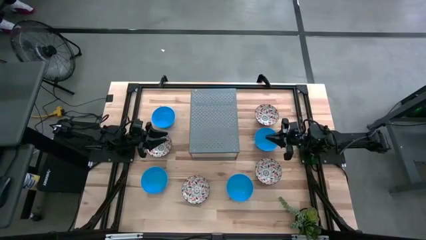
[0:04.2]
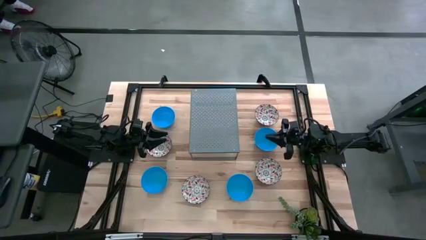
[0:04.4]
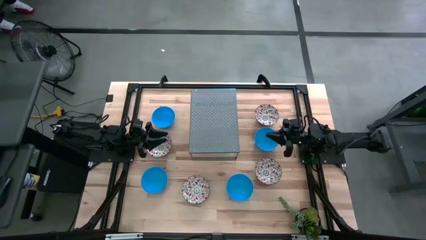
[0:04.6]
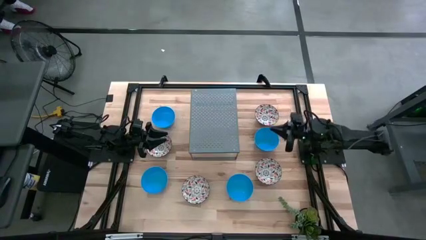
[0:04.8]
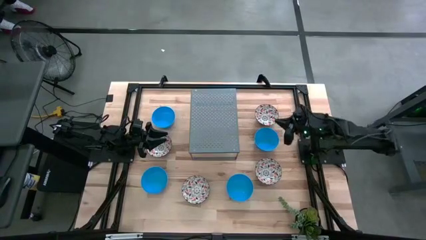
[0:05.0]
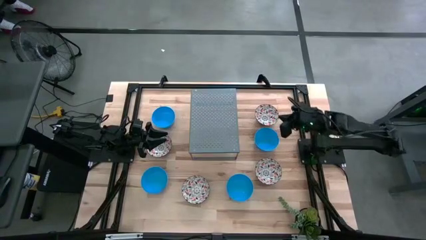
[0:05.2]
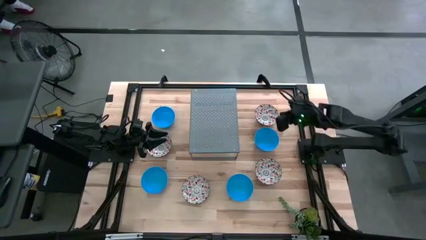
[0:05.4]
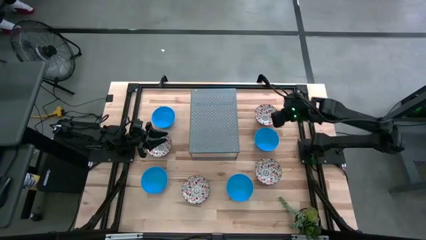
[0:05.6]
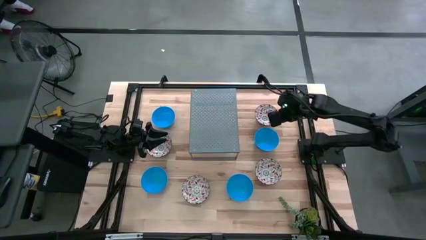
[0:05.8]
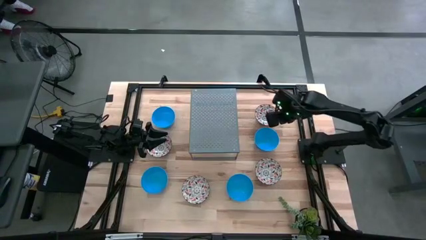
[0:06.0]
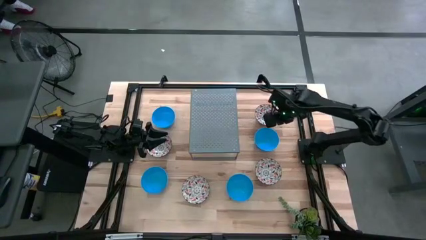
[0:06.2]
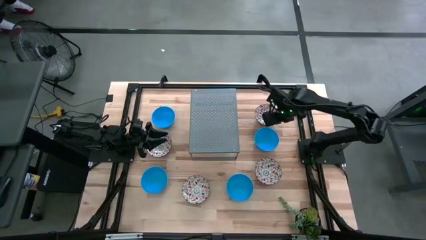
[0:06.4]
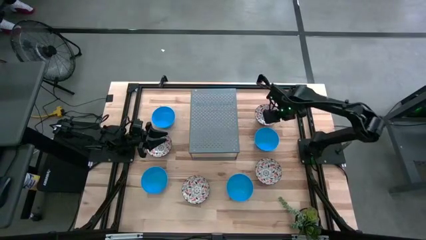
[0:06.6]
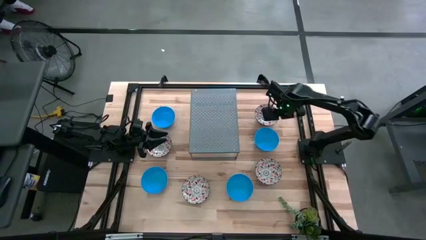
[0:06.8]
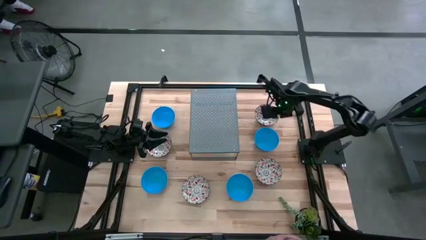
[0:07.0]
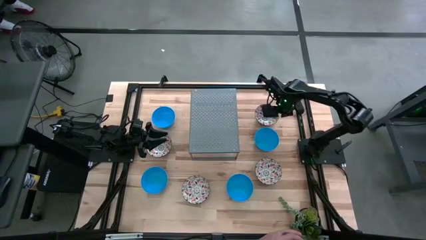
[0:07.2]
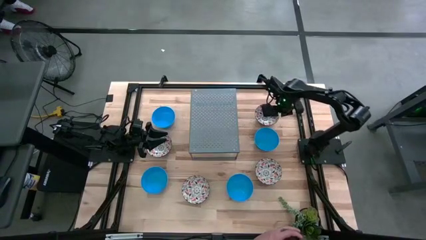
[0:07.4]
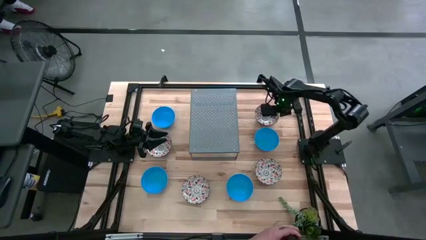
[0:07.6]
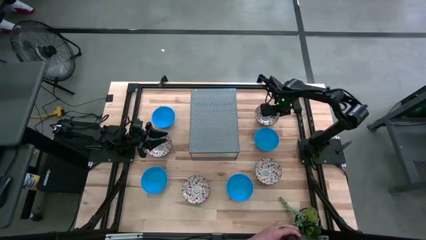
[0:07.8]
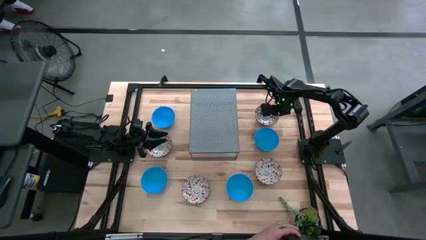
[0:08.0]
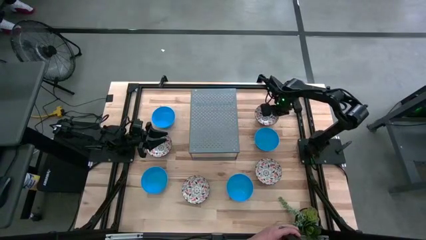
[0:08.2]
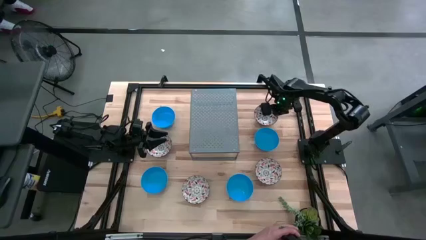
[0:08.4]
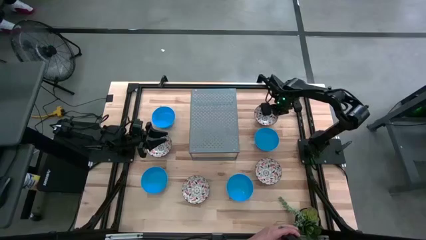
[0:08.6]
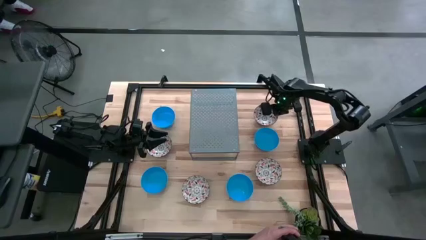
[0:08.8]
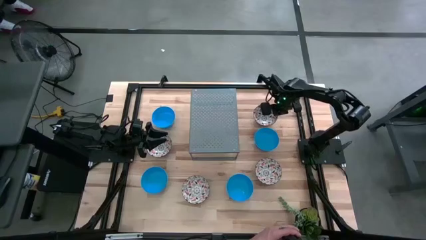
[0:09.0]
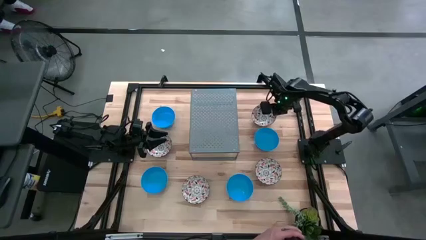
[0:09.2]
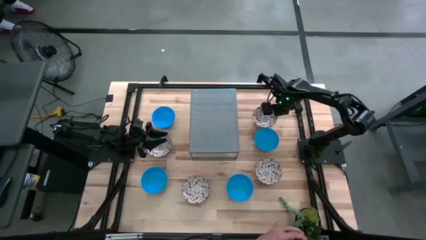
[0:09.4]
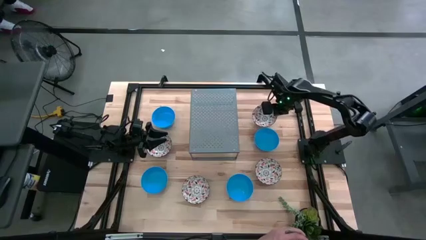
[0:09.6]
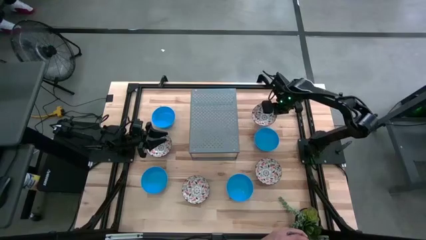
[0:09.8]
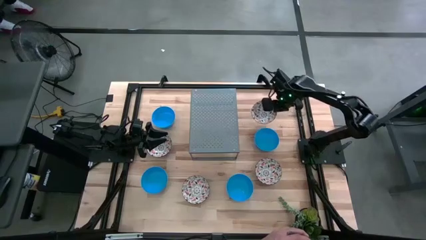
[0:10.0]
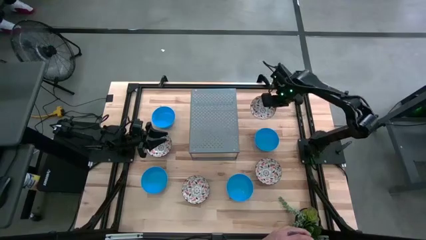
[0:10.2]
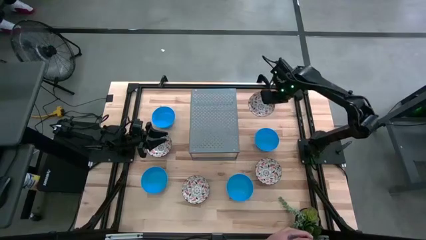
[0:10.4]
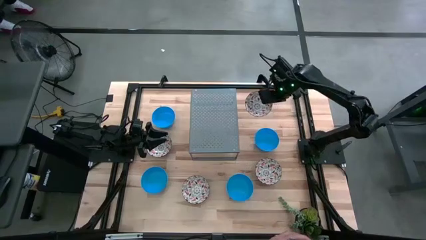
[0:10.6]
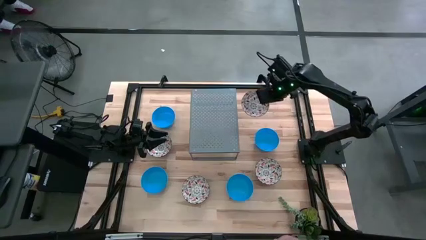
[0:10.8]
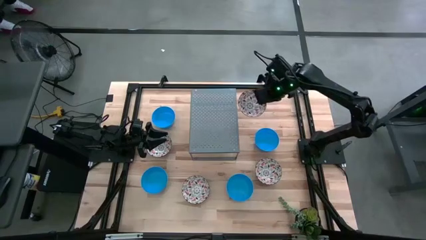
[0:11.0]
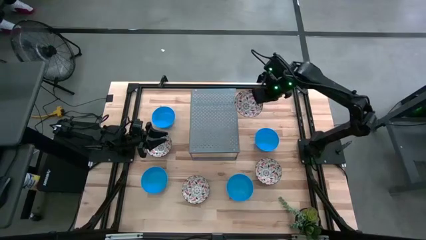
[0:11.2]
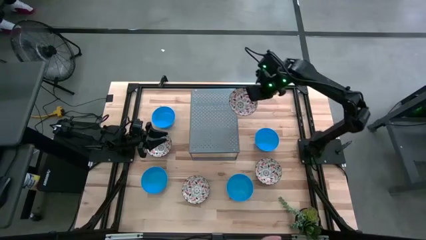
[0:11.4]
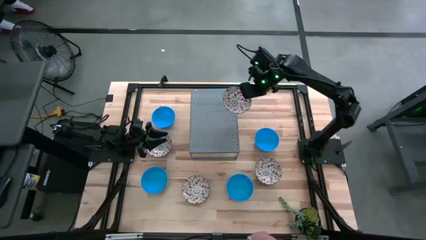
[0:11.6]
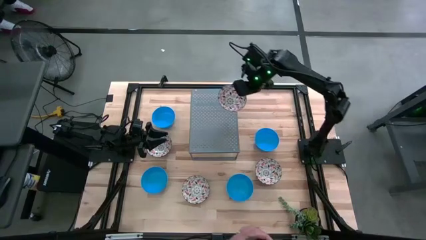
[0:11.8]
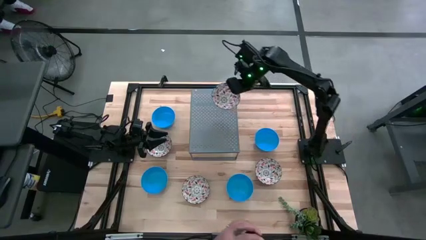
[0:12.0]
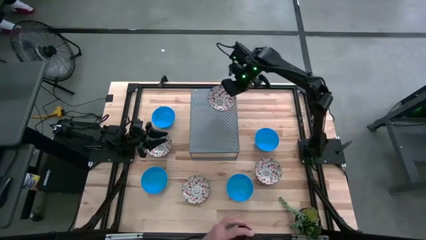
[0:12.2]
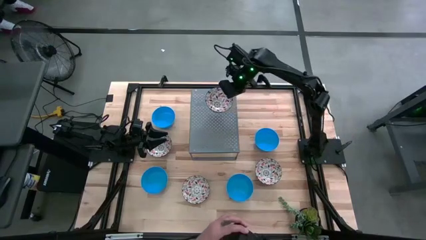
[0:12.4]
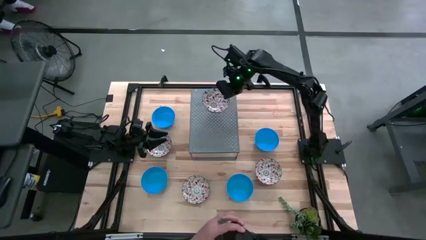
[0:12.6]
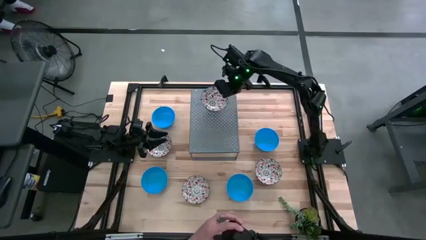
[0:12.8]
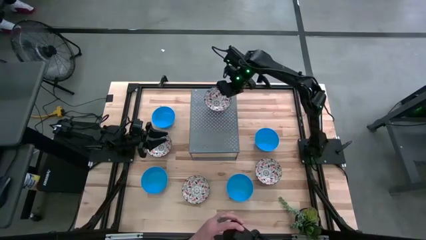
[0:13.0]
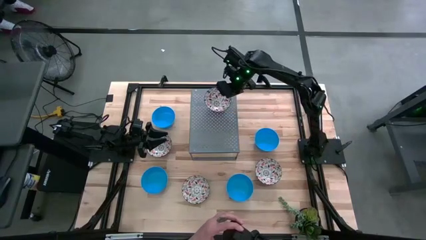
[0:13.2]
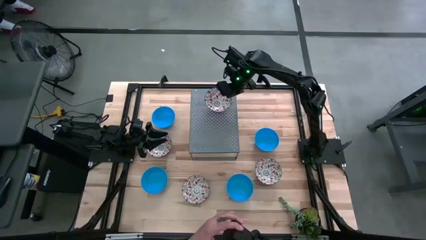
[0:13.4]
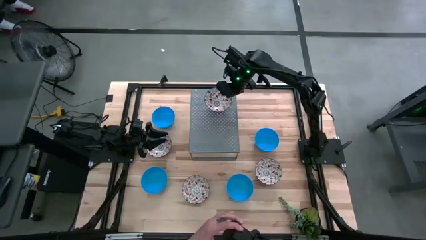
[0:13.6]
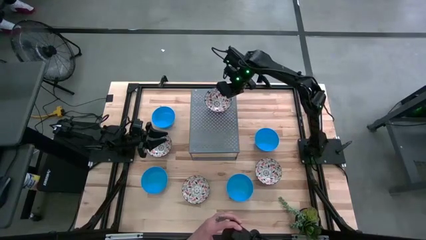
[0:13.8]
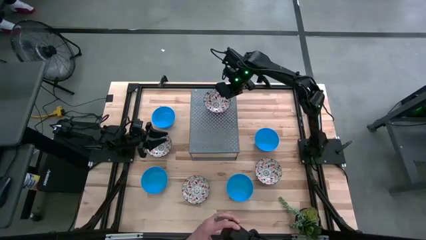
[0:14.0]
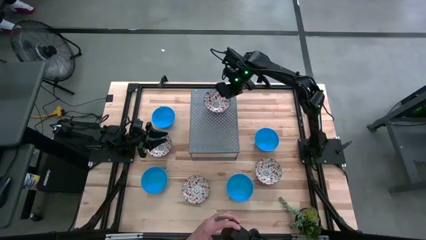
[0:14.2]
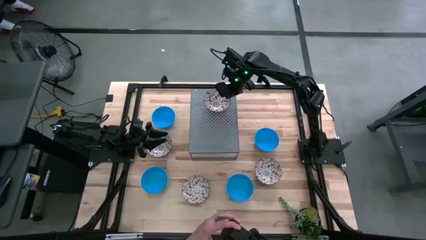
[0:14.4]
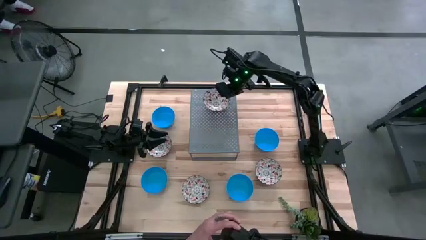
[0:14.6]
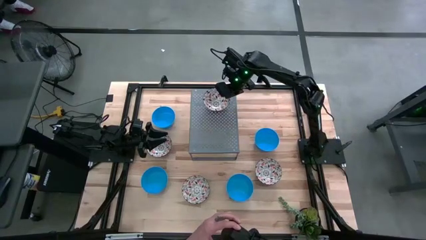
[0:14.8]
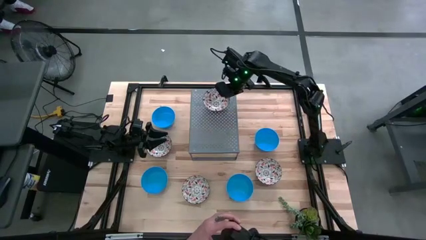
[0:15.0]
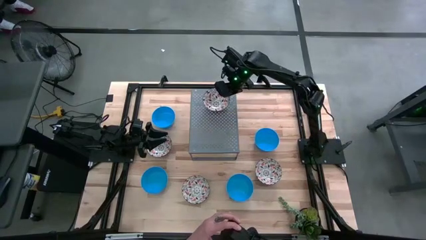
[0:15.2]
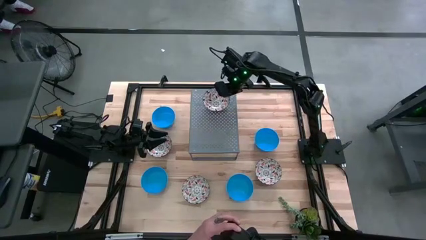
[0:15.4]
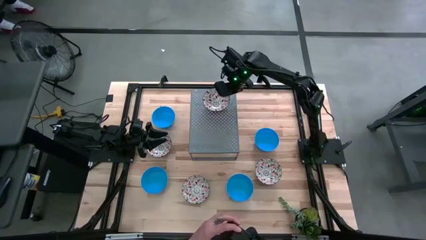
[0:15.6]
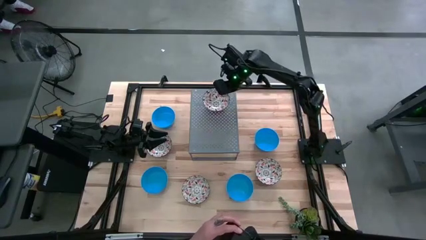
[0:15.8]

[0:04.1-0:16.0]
Task: Pick & Place Mini bowls
Put the white patterned bowl on the shelf
